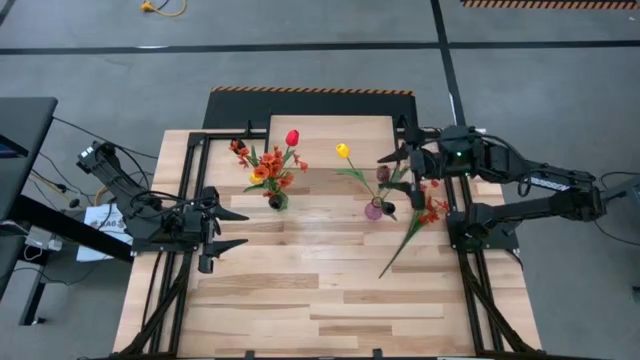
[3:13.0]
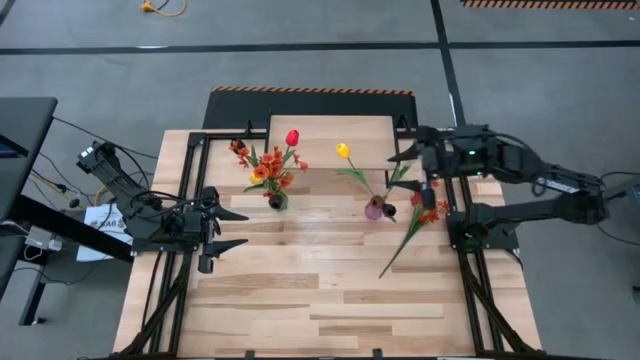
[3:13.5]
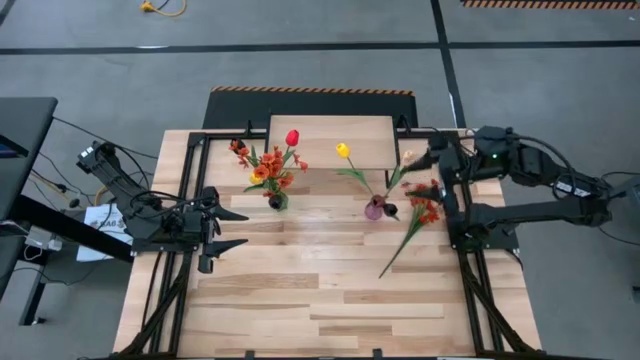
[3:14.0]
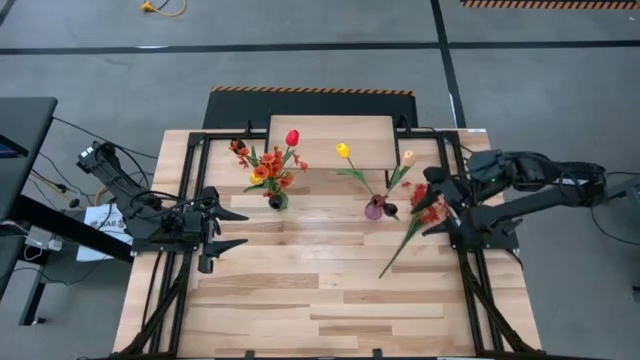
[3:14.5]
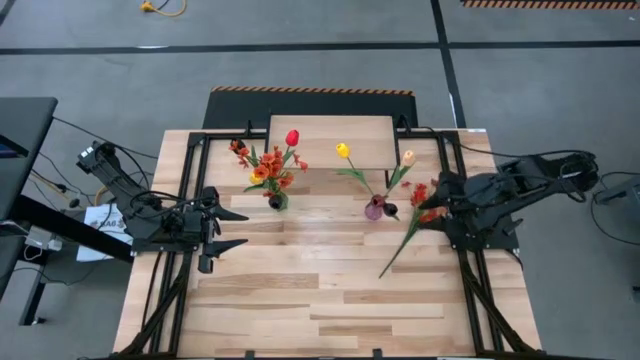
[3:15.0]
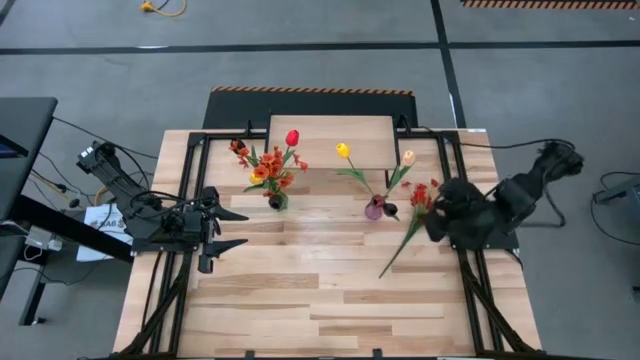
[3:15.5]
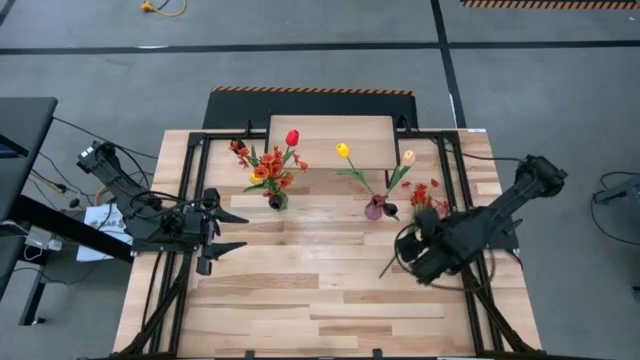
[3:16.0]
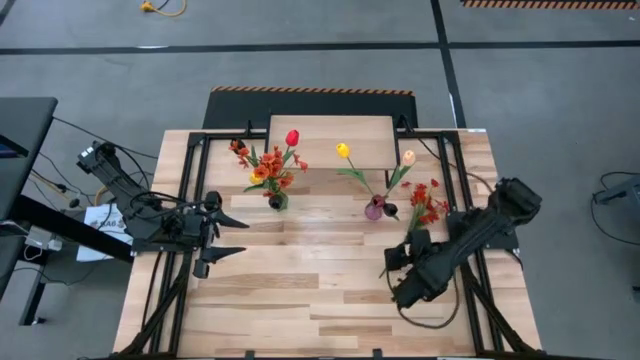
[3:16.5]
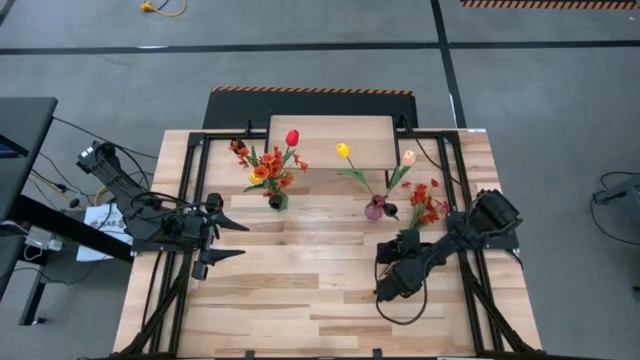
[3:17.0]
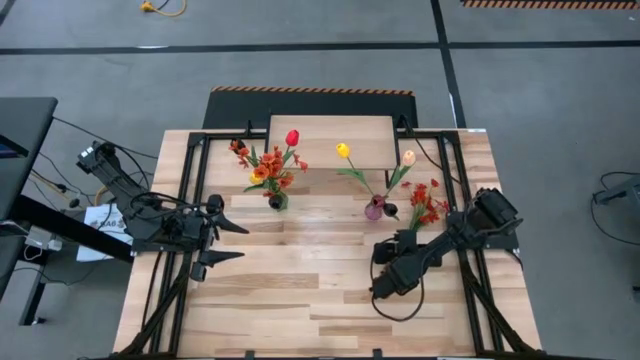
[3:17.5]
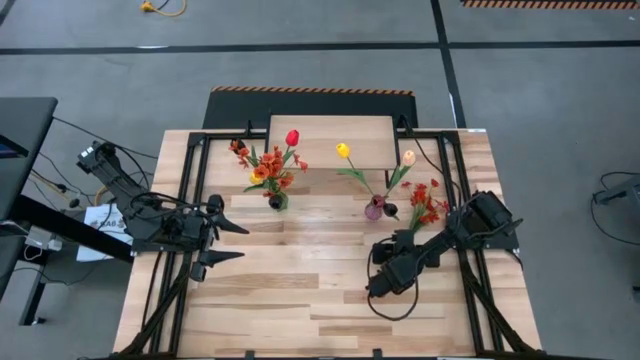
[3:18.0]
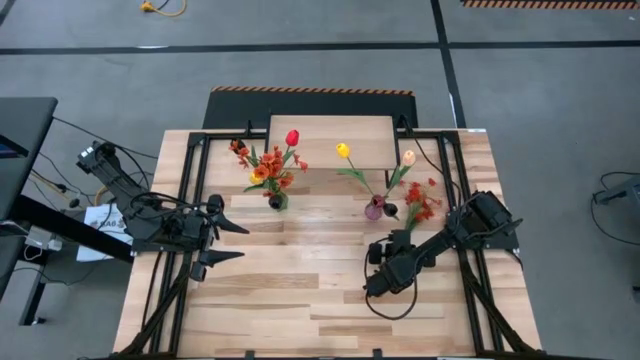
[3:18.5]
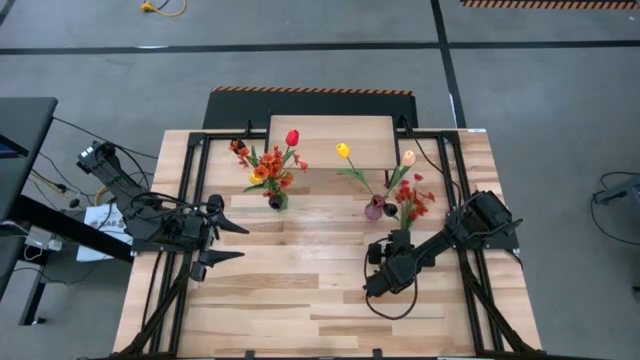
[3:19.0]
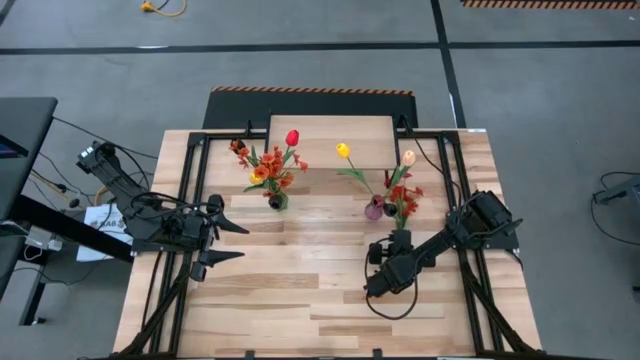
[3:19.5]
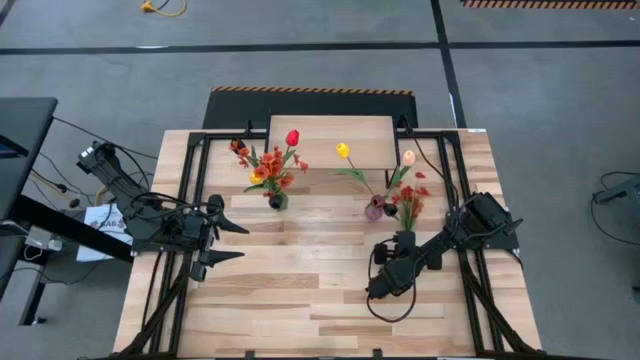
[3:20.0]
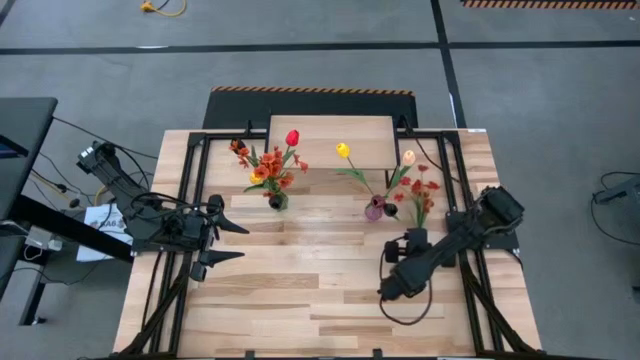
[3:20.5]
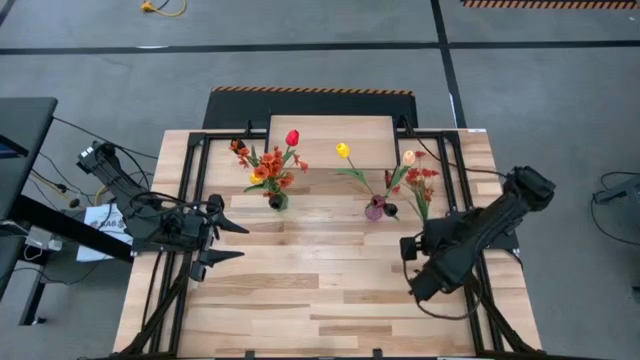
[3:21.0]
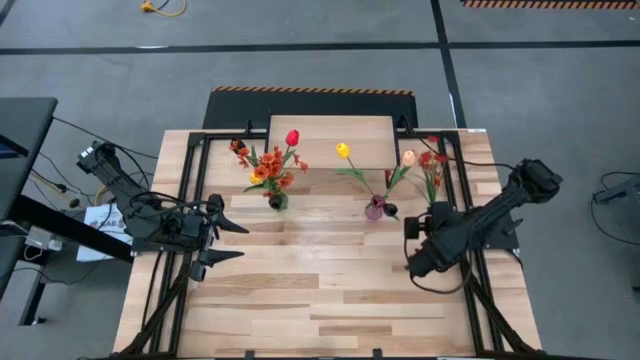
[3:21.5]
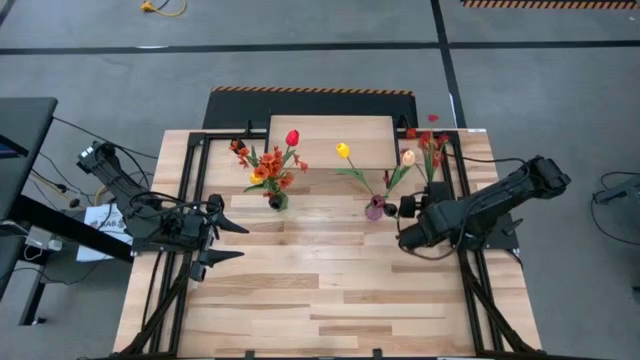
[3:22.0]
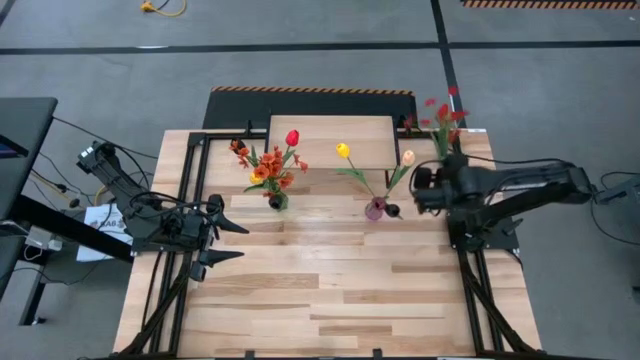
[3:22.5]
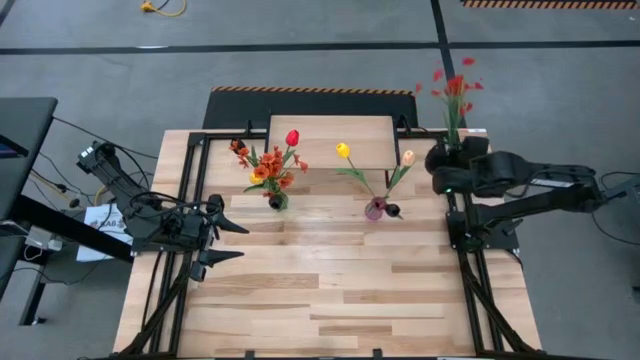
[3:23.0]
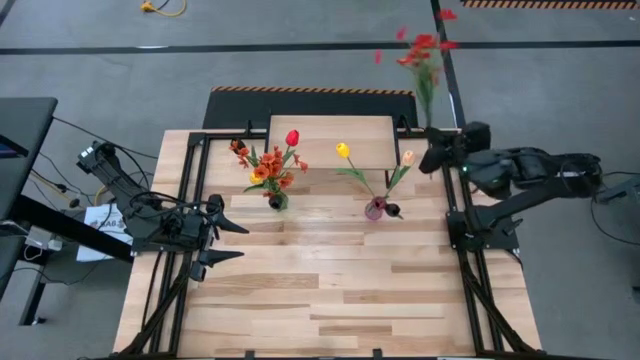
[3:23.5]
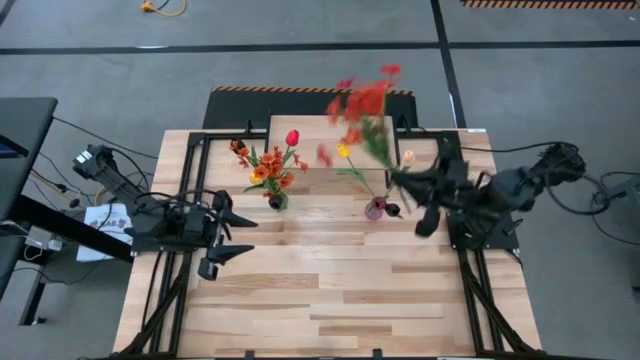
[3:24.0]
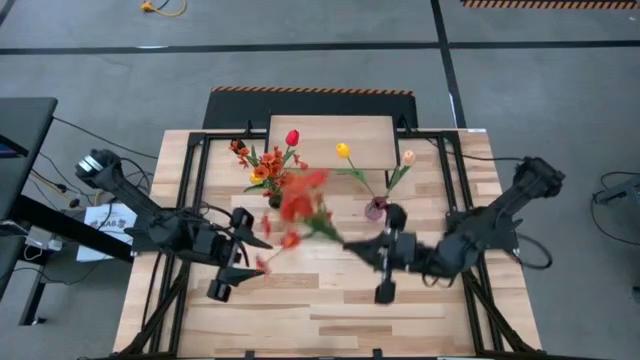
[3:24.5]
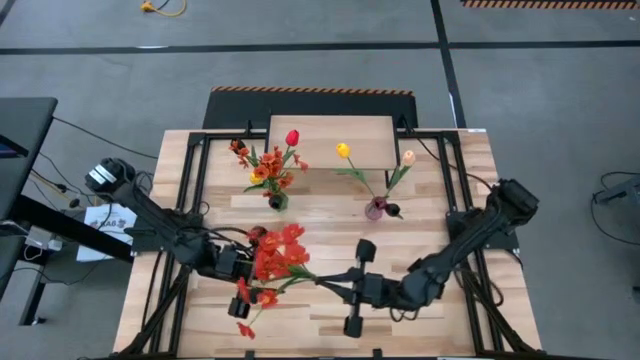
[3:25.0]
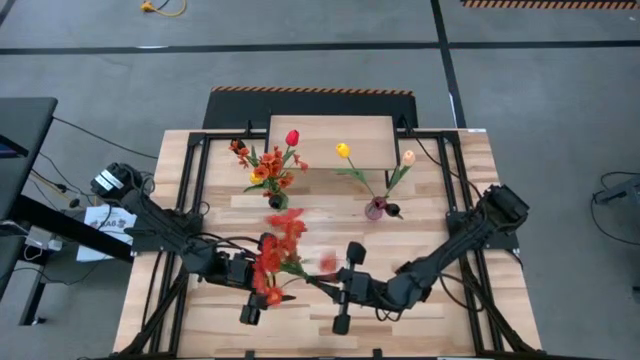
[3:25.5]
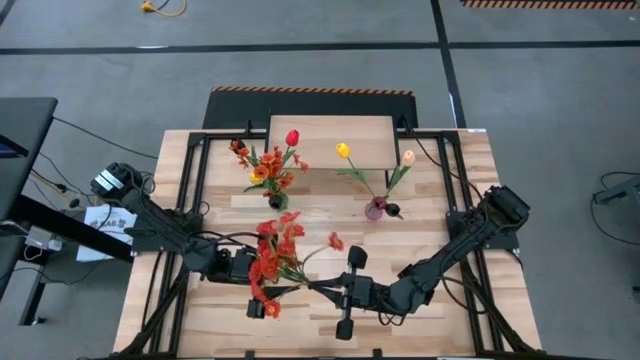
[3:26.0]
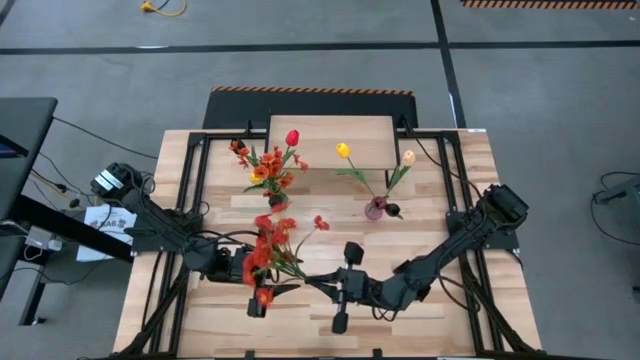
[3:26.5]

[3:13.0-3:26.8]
Task: Pick and place flowers into a vace then onto a shelf
Put the orange flowers into the purple vase

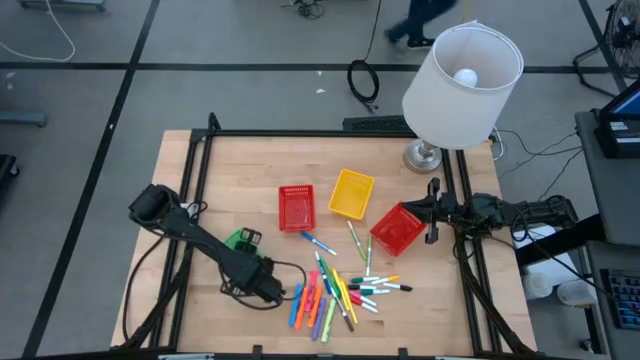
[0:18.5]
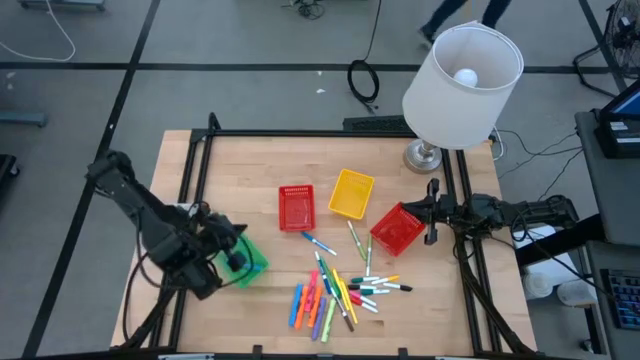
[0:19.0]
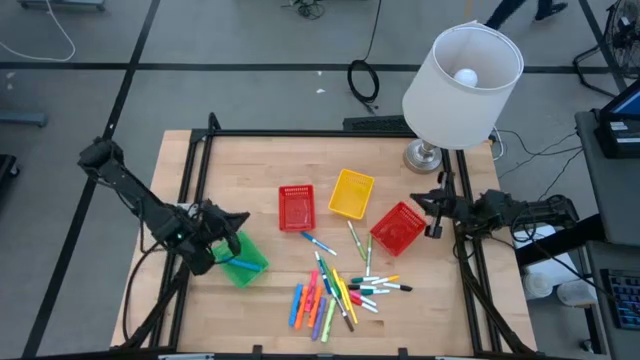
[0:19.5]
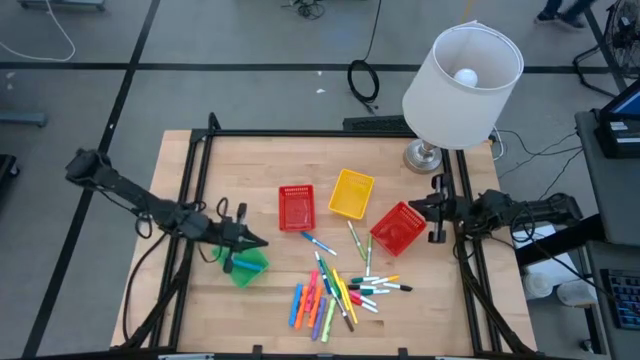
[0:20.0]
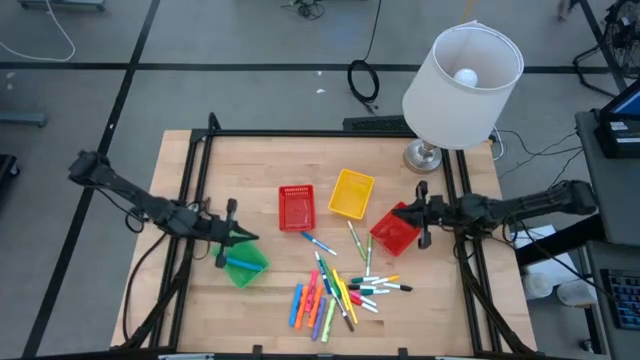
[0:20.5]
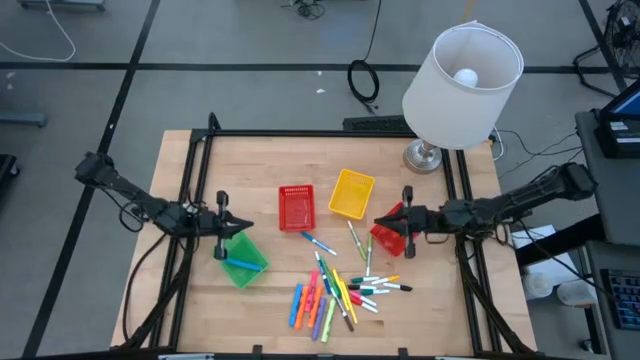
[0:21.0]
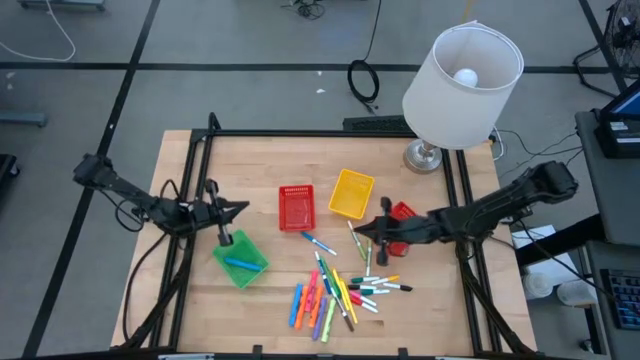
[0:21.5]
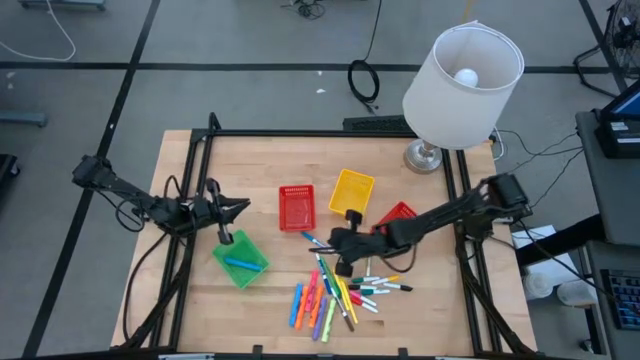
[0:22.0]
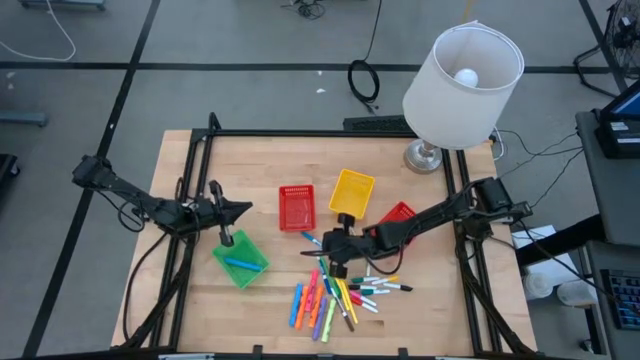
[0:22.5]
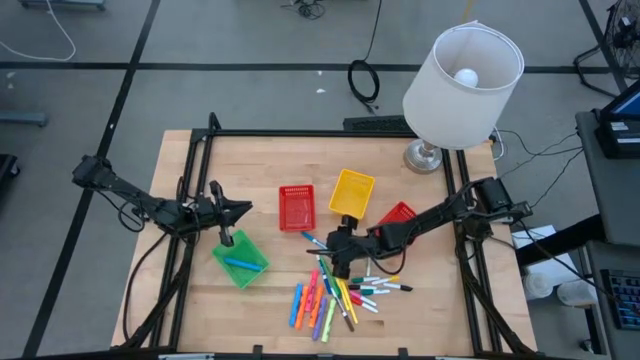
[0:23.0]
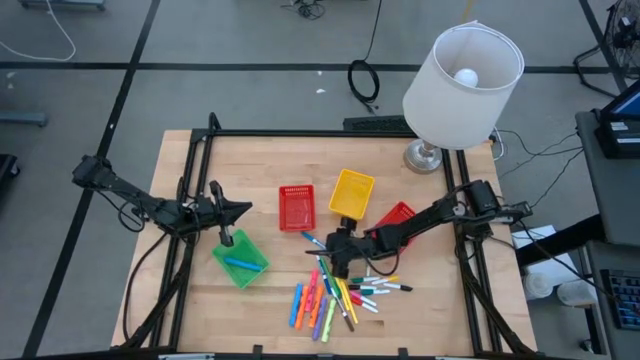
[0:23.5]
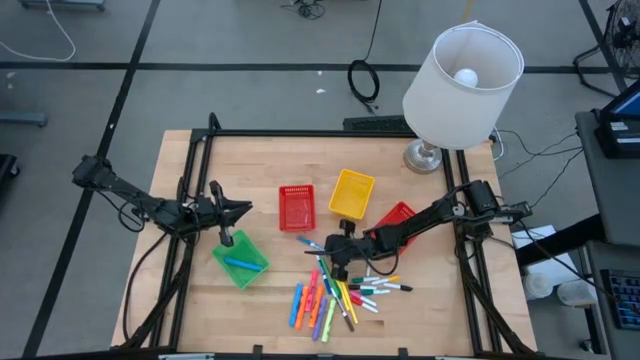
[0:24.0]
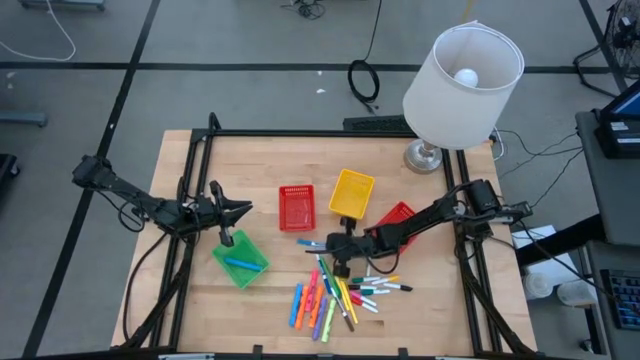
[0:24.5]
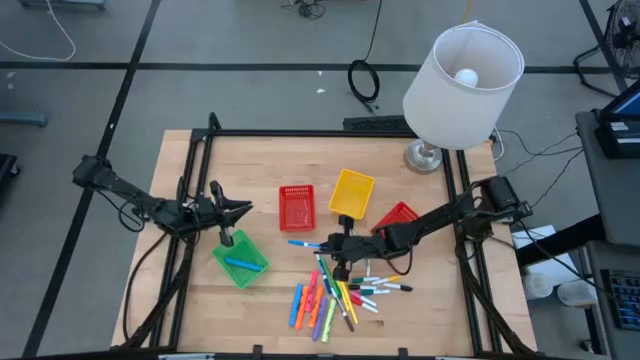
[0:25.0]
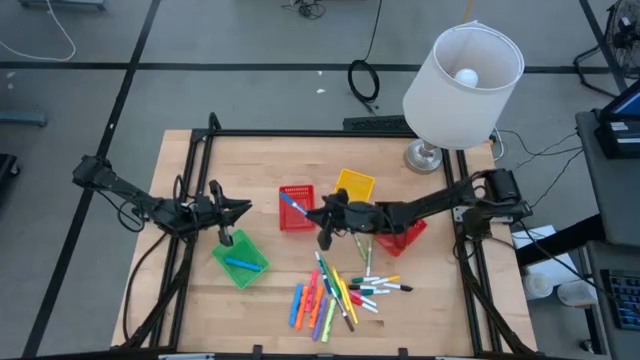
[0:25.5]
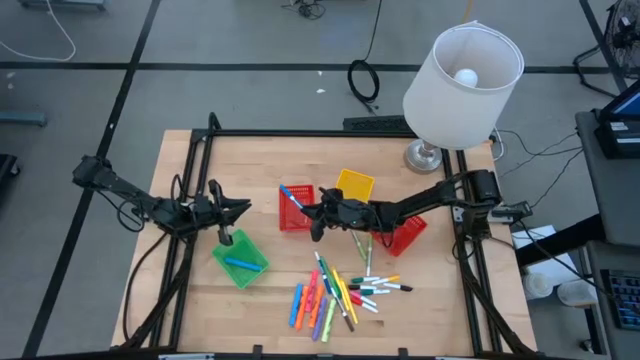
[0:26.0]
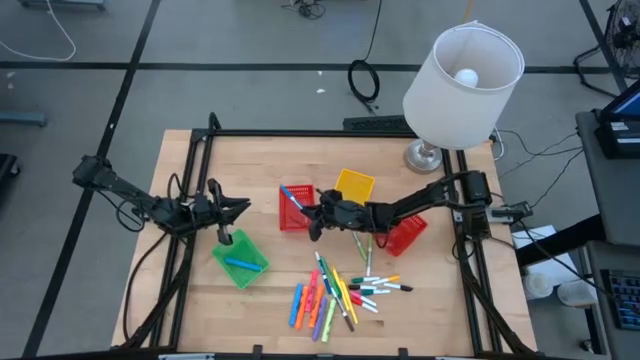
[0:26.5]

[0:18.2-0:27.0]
Task: Pick & Place Markers
Put the blue marker pen into the left red bin
